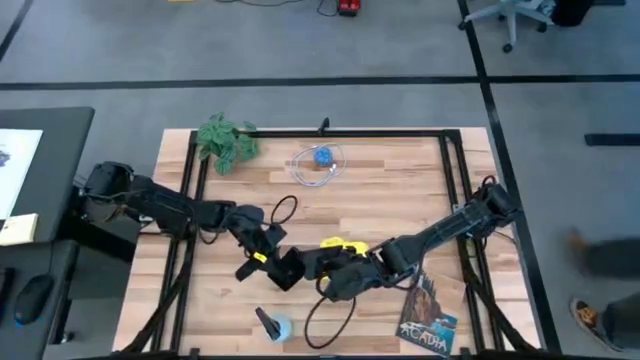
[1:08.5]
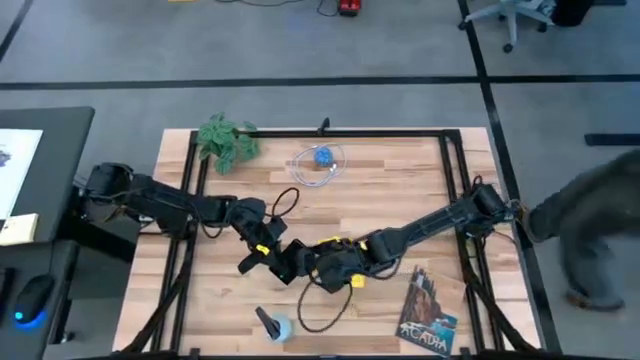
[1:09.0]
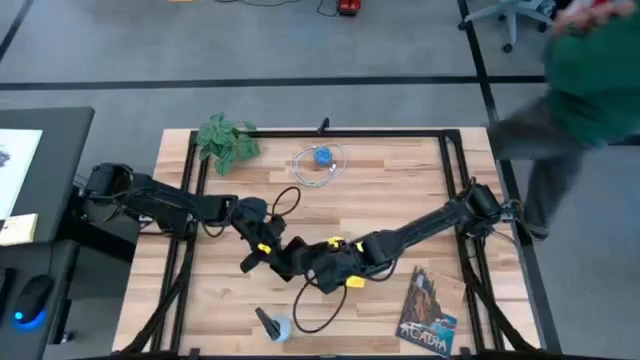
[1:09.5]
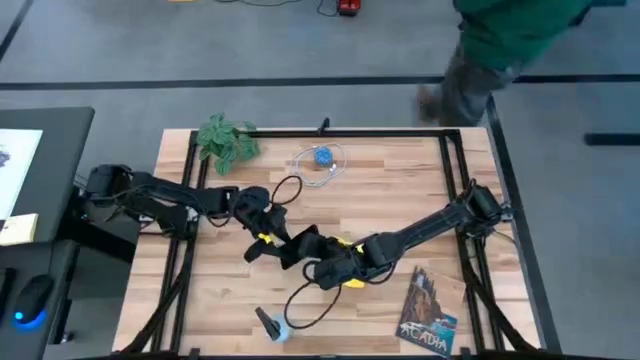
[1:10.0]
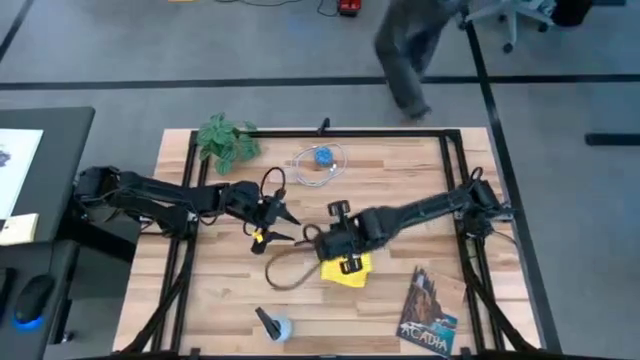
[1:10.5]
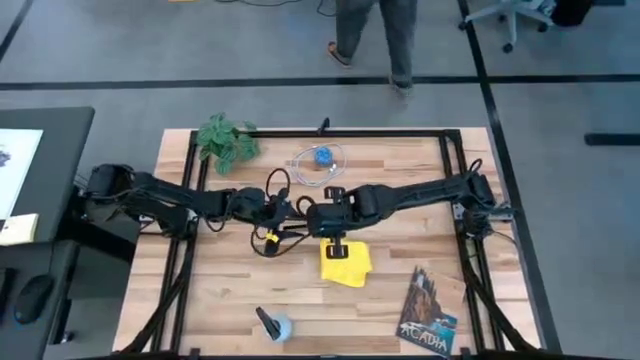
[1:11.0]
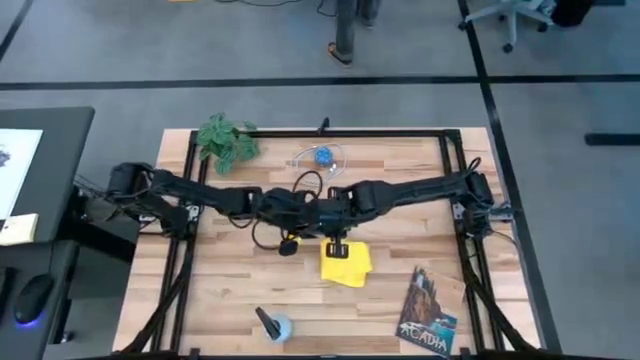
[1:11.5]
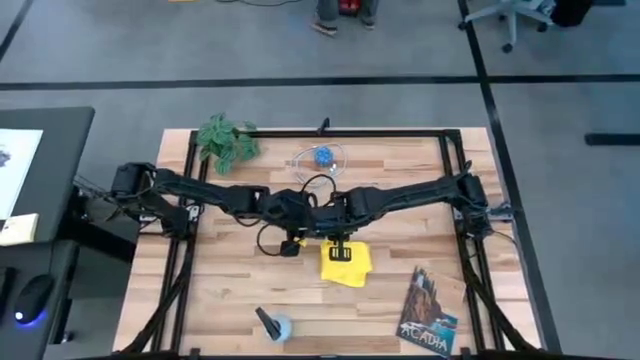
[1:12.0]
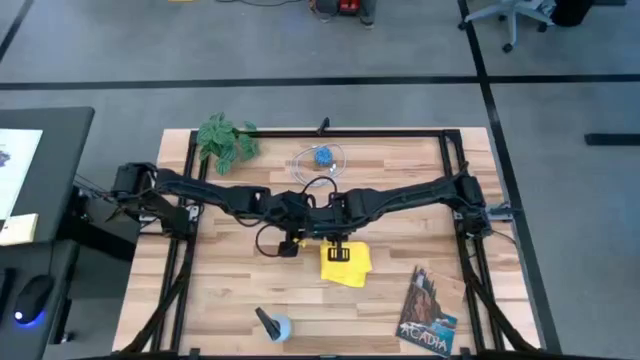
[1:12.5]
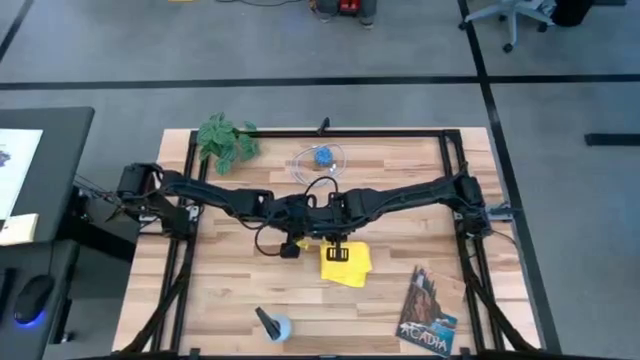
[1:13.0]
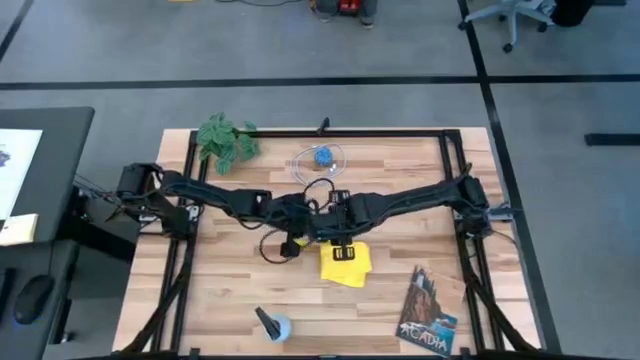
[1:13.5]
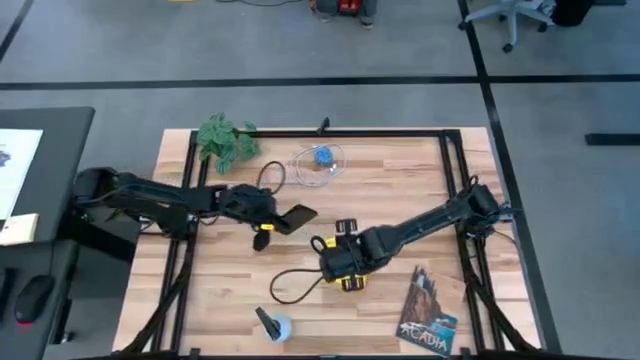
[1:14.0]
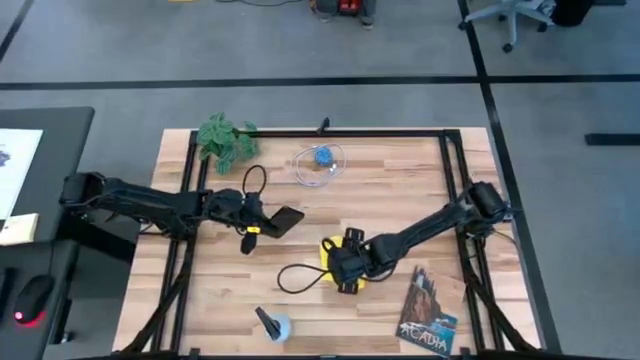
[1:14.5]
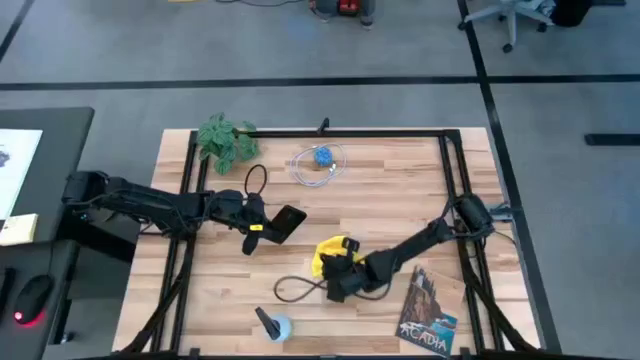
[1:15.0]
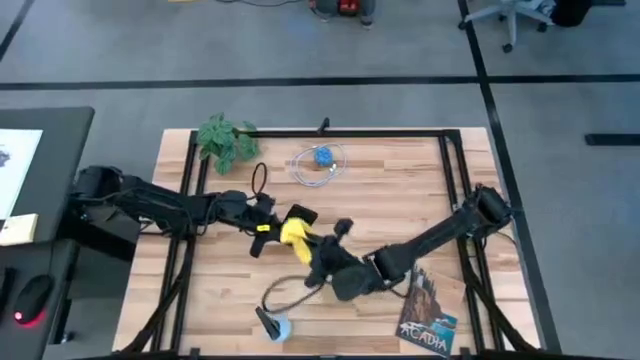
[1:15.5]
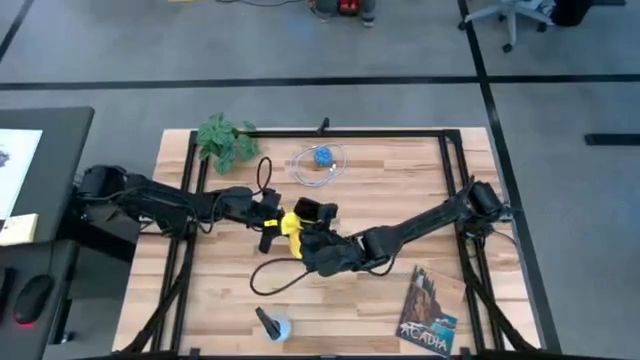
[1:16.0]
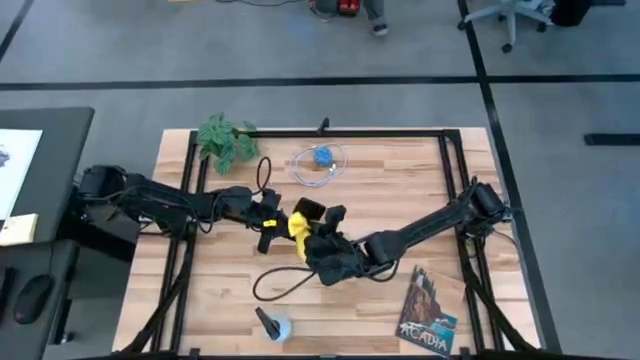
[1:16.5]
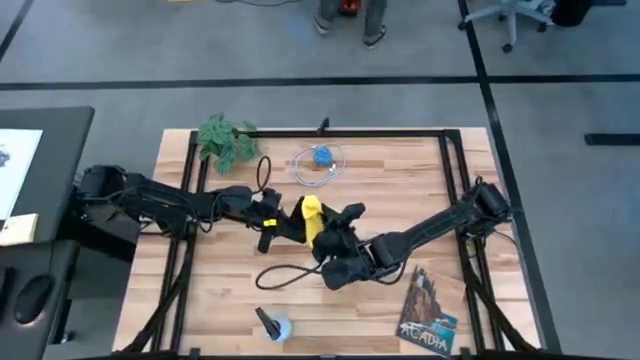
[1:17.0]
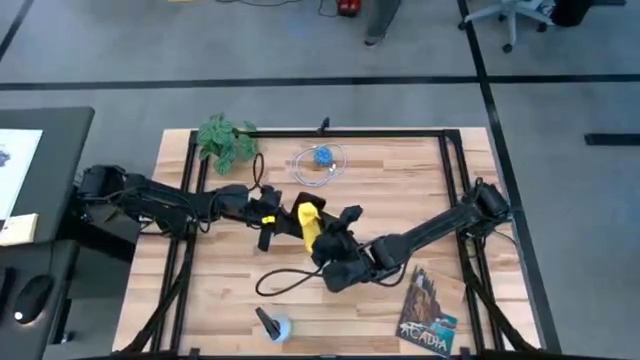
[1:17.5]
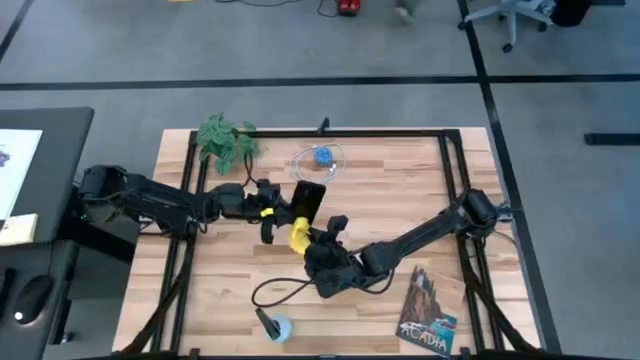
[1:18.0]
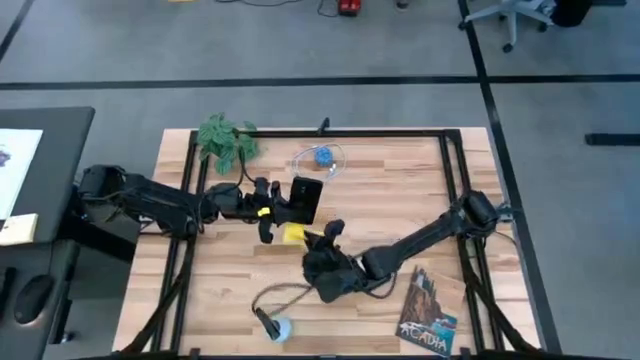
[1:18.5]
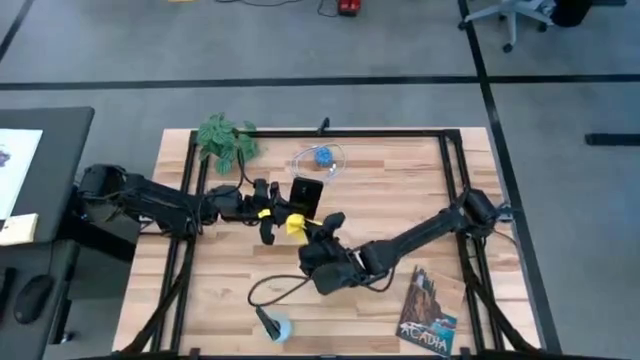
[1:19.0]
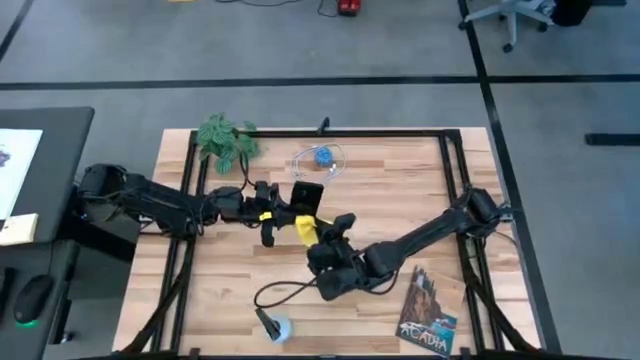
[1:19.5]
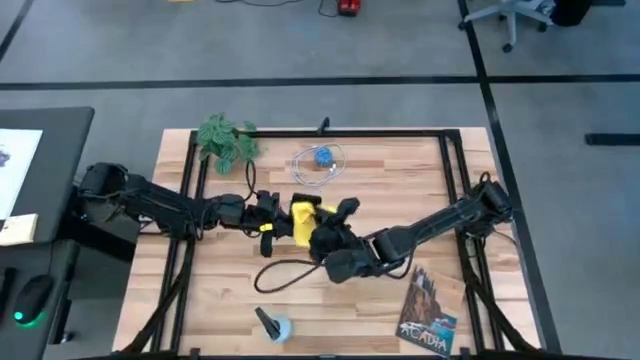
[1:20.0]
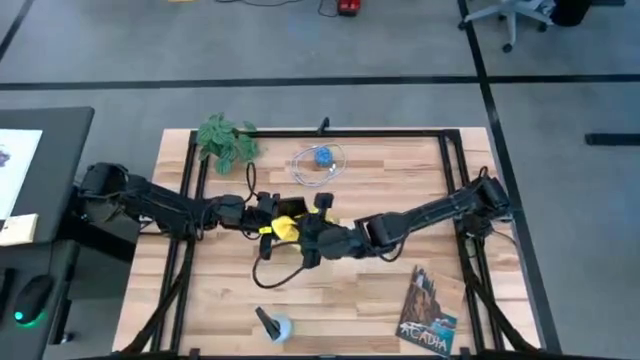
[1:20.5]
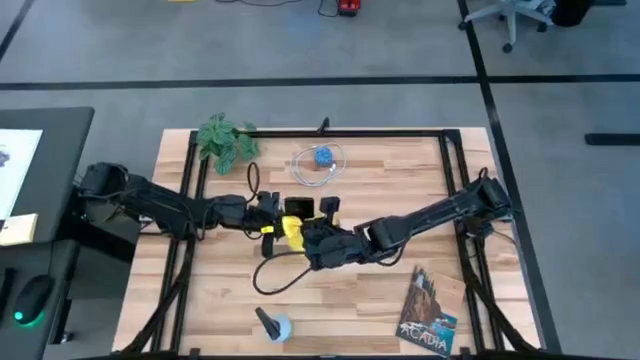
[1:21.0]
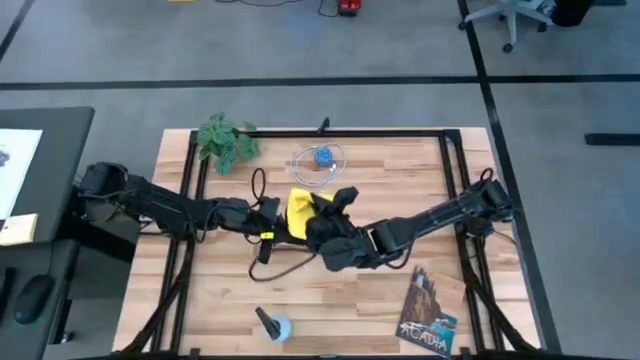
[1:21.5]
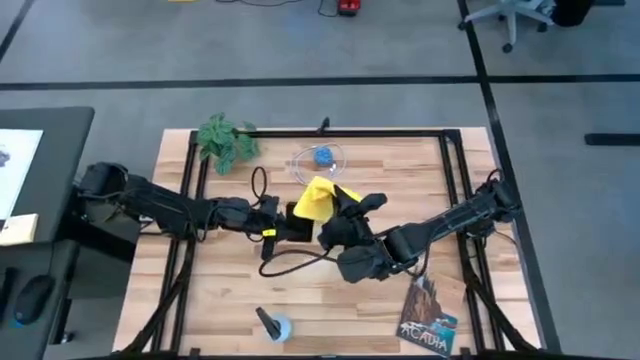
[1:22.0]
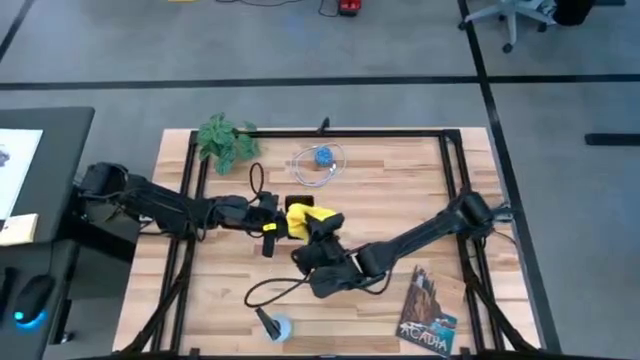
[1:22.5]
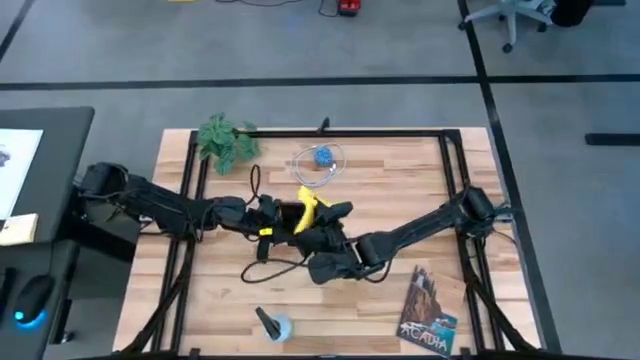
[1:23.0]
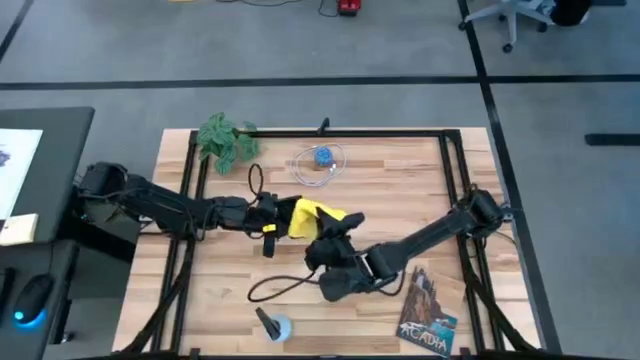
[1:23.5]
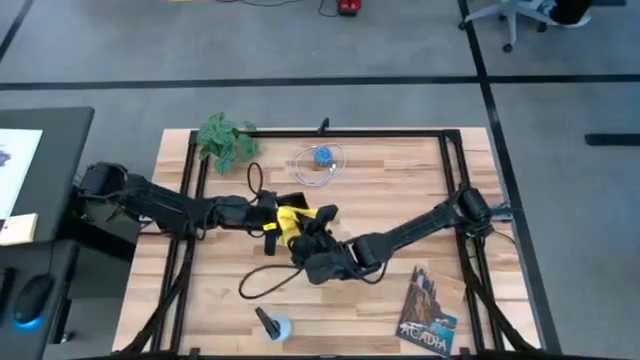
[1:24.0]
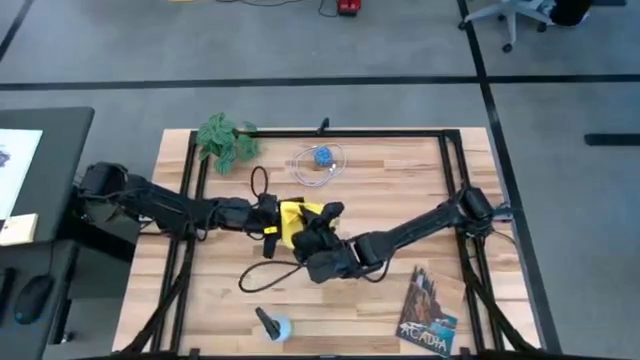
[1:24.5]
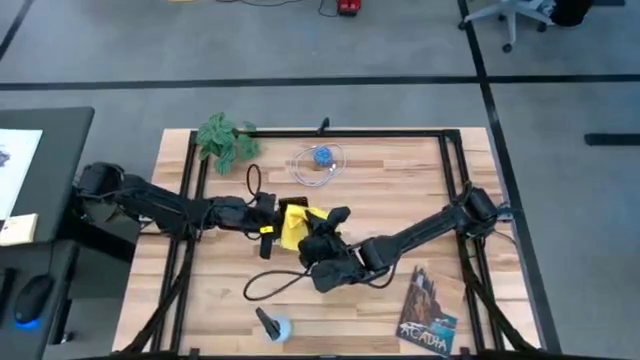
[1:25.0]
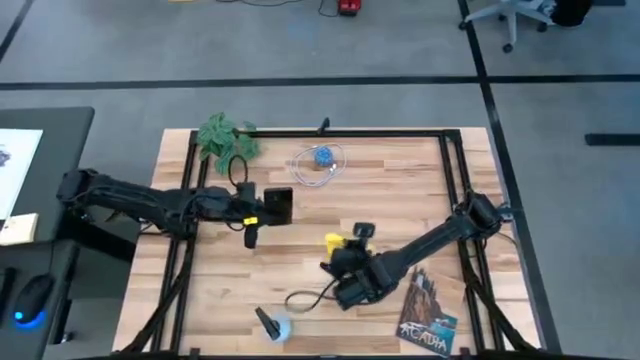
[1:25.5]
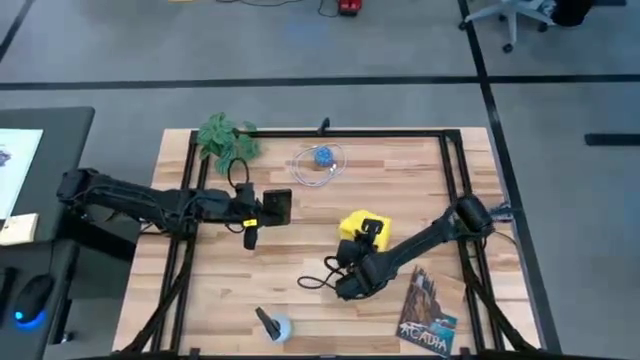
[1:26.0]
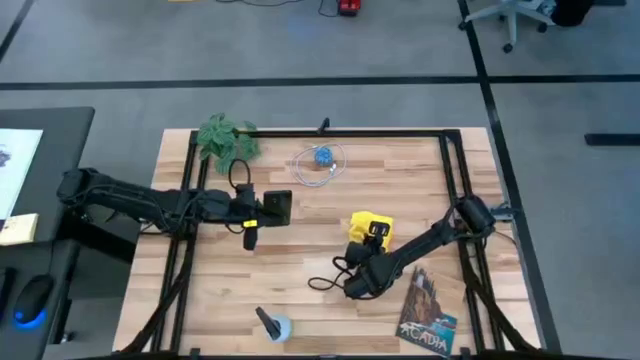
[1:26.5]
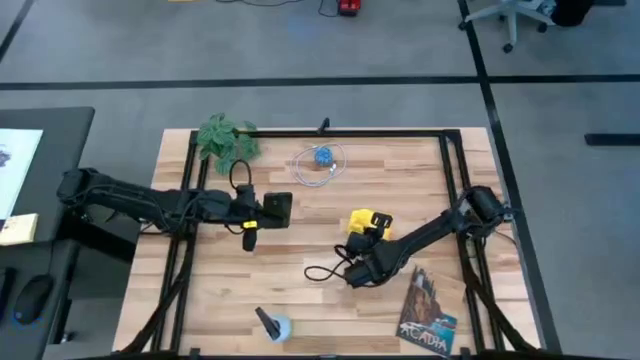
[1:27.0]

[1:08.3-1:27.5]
Task: Apply microfiber cloth
Wipe the cellphone using a microfiber cloth

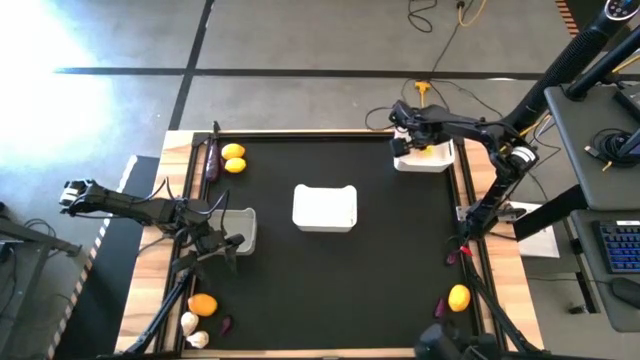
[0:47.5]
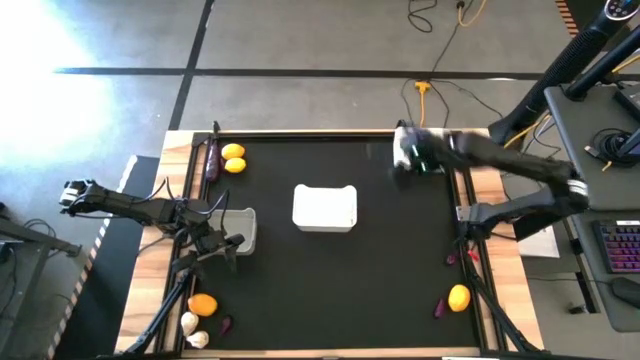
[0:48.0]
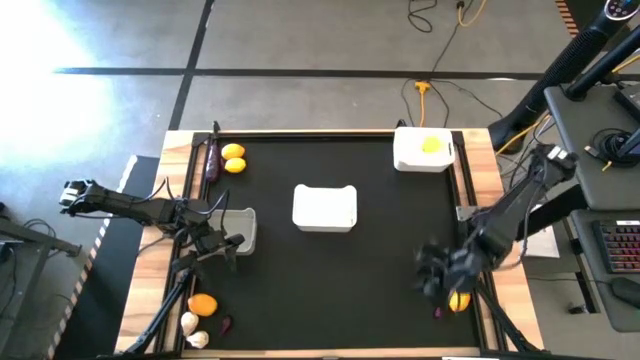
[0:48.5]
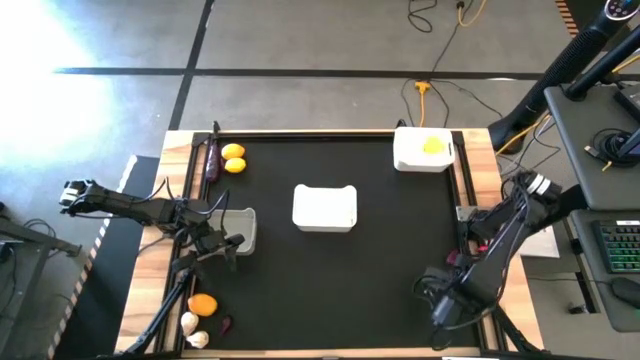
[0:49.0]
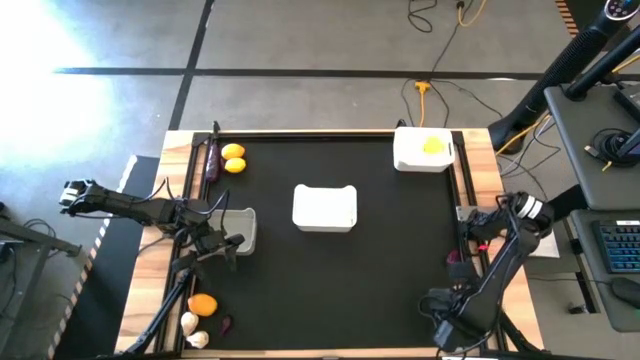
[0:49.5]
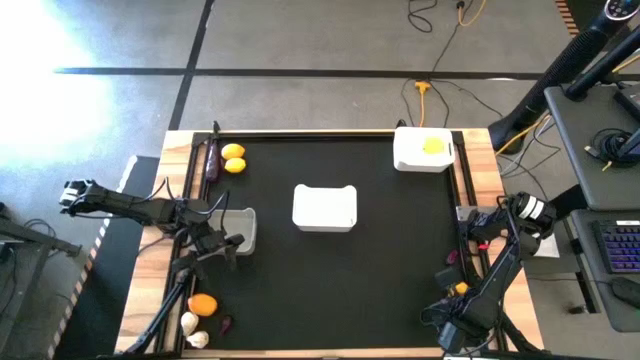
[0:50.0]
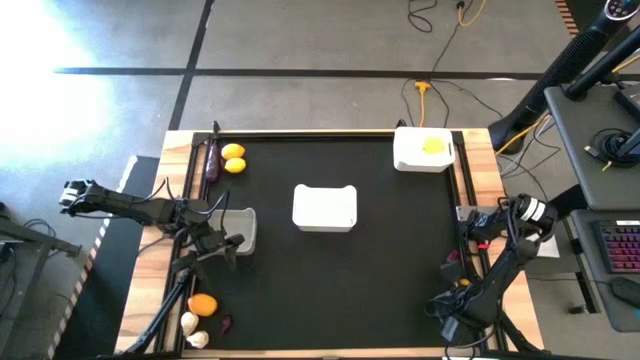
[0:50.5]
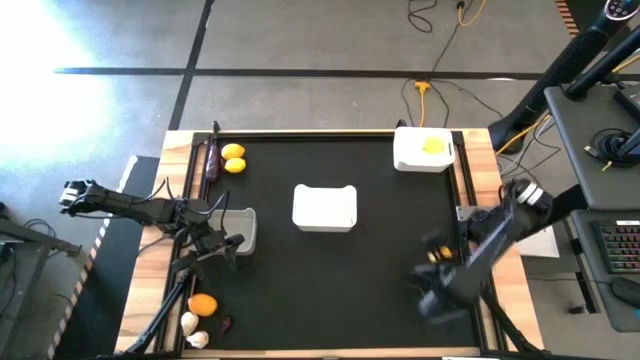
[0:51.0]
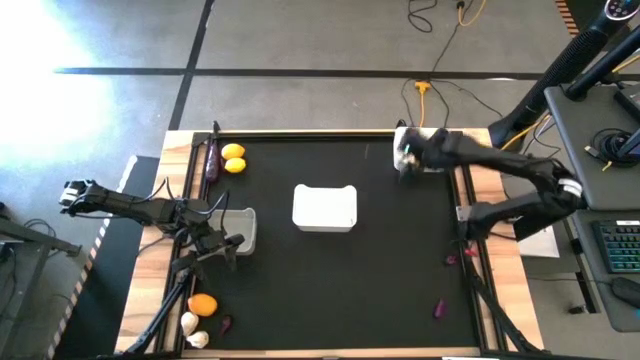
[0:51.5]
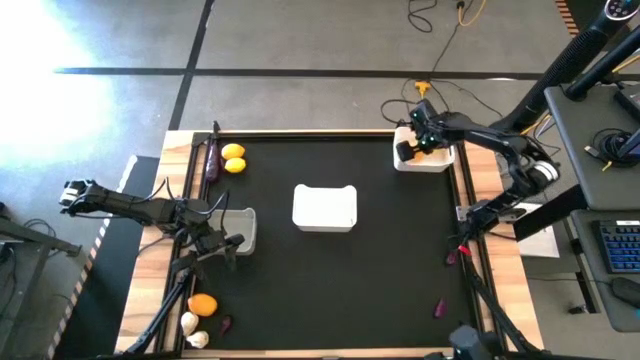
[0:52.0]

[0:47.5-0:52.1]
Task: Sort produce into baskets
Put the yellow lemon into the top white bin
